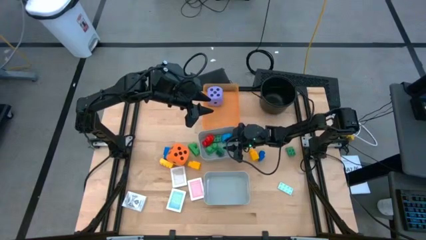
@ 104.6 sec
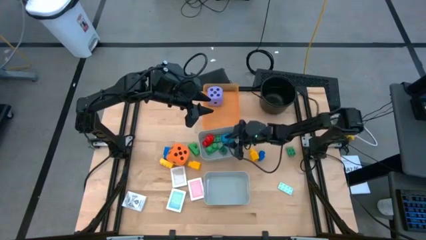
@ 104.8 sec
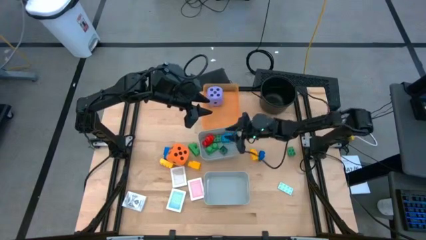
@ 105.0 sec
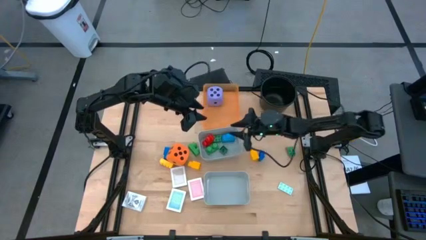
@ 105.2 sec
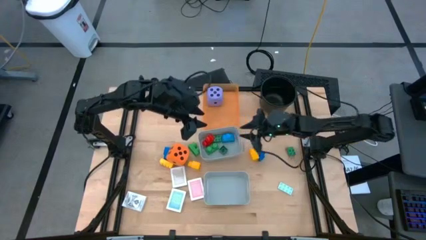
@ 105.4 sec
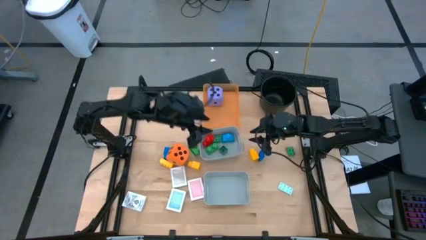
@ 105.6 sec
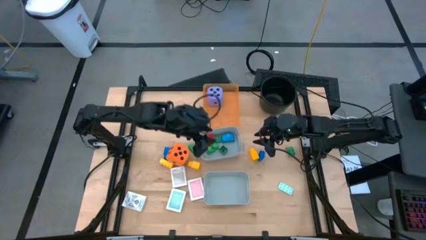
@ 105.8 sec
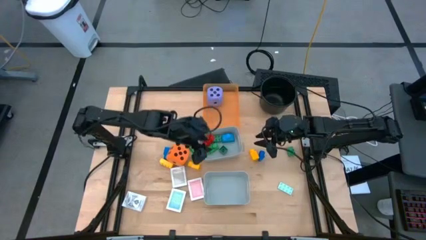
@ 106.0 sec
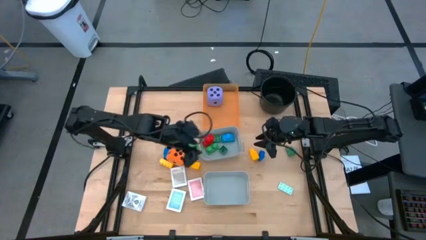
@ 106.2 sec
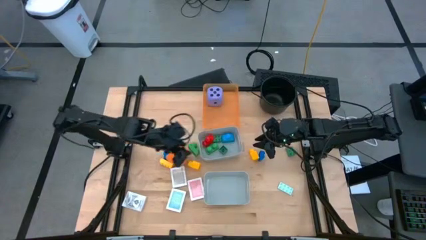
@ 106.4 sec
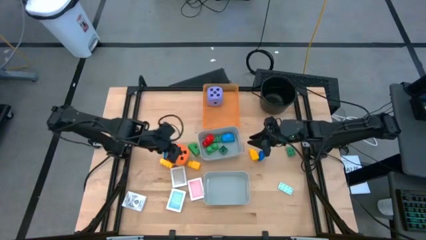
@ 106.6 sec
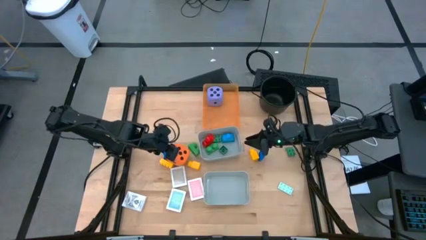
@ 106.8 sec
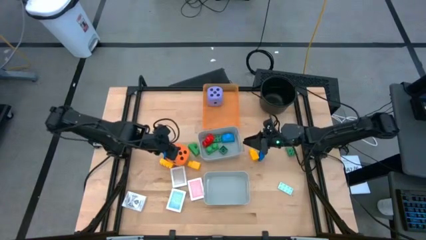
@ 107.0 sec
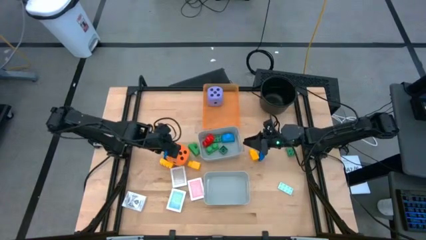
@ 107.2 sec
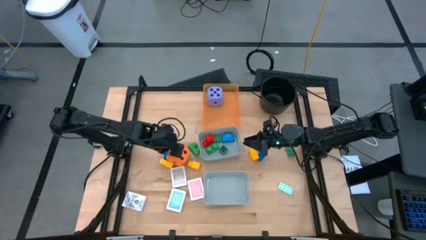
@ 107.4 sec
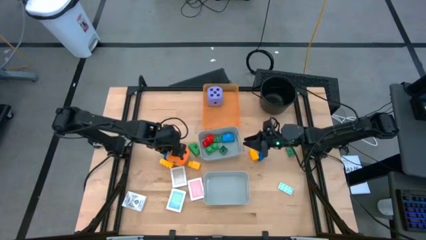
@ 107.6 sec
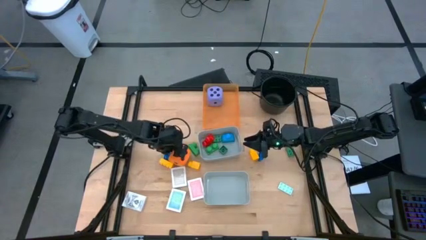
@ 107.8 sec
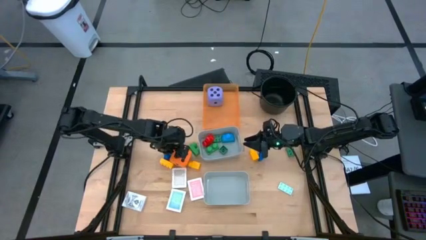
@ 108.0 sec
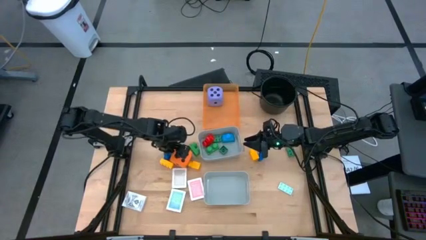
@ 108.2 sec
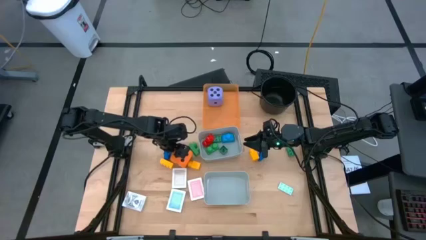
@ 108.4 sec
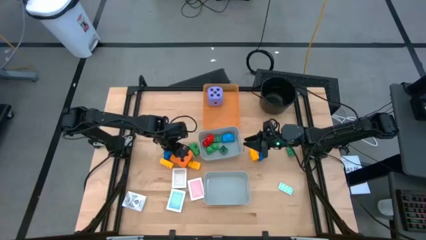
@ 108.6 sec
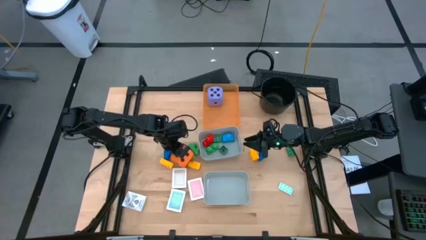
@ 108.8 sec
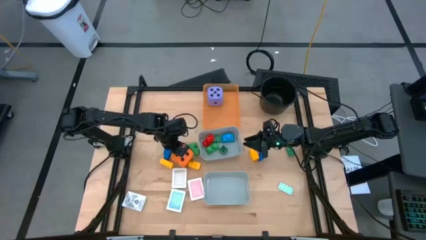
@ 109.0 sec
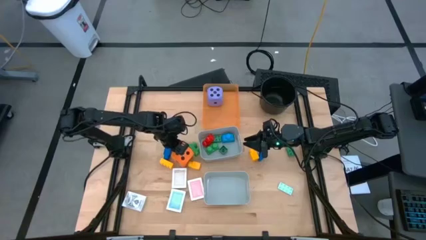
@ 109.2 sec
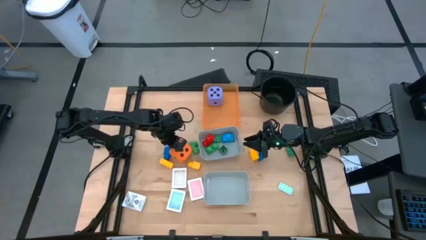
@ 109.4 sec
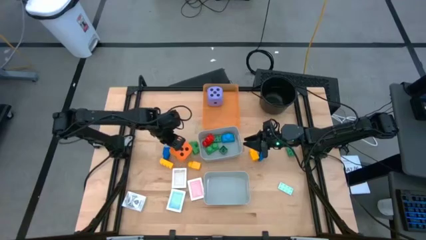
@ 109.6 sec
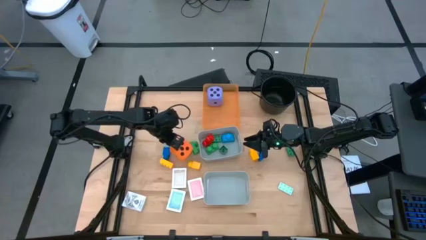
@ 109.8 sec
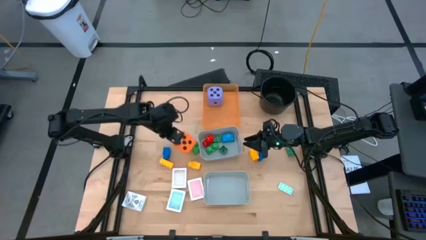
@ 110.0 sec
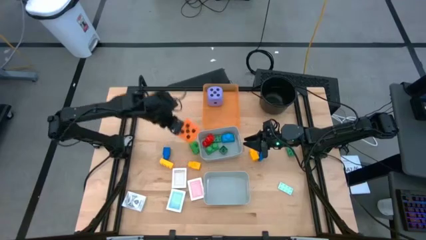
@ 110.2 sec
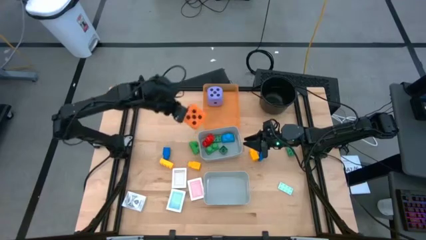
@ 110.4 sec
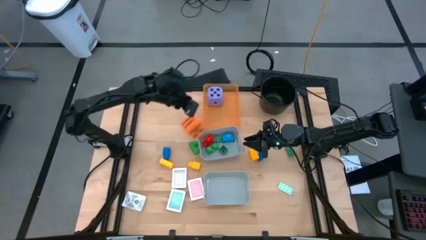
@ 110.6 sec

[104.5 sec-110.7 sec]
Task: Pick & Place Toys
Put the orange dice into the orange bin

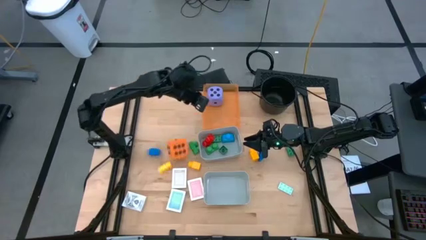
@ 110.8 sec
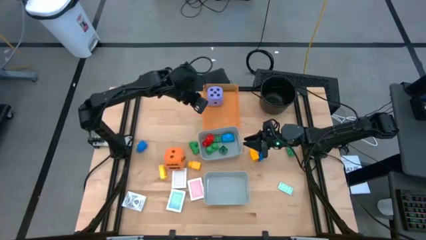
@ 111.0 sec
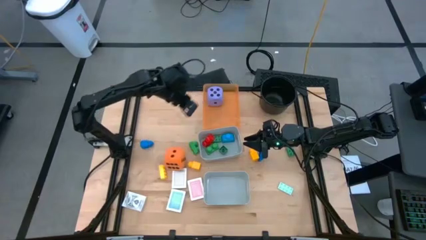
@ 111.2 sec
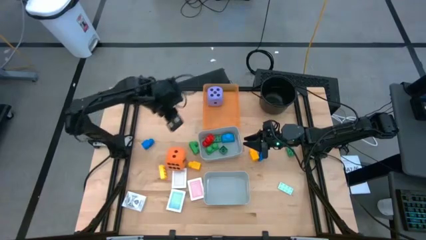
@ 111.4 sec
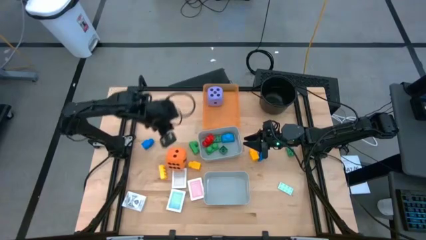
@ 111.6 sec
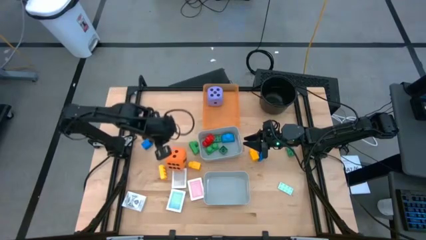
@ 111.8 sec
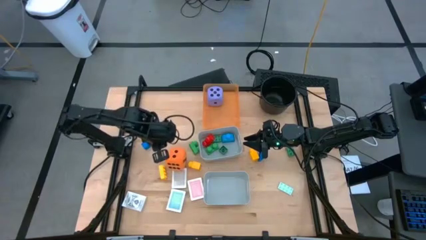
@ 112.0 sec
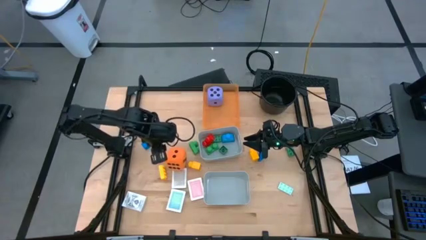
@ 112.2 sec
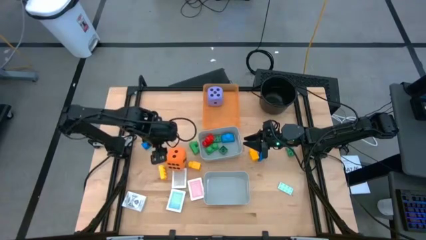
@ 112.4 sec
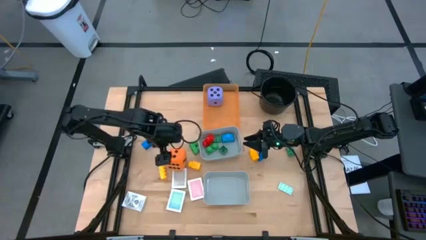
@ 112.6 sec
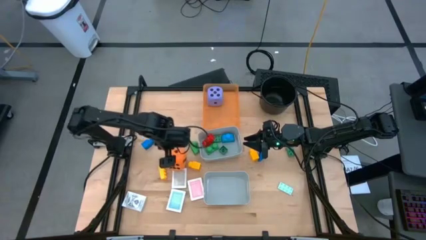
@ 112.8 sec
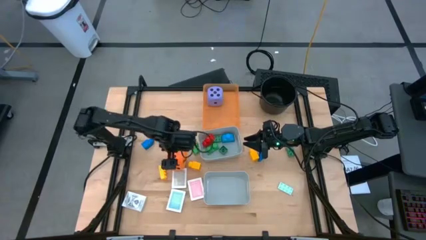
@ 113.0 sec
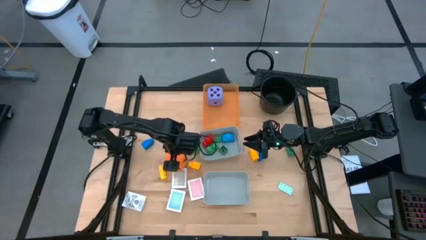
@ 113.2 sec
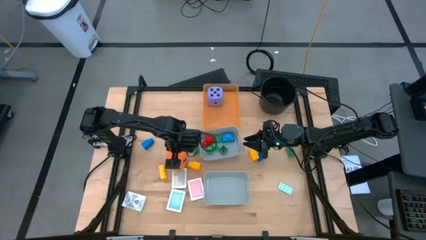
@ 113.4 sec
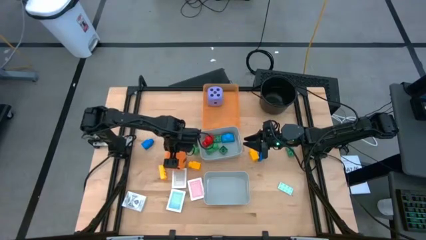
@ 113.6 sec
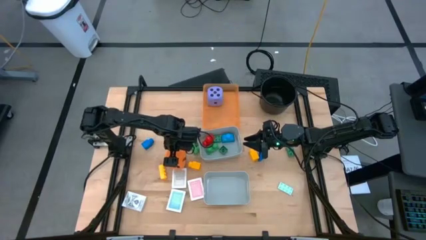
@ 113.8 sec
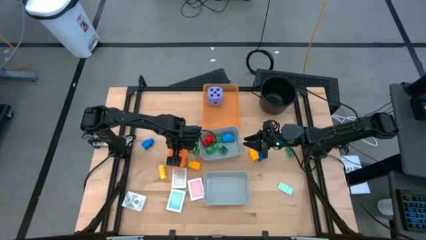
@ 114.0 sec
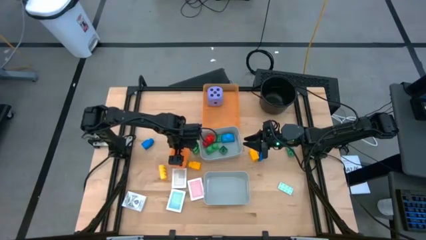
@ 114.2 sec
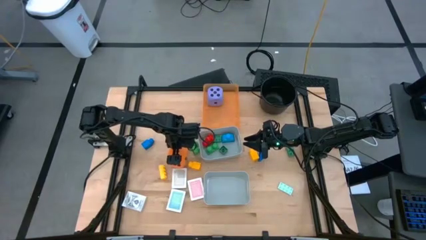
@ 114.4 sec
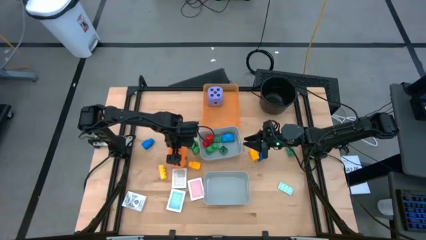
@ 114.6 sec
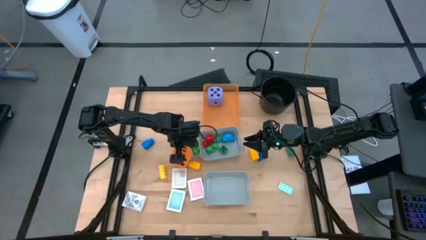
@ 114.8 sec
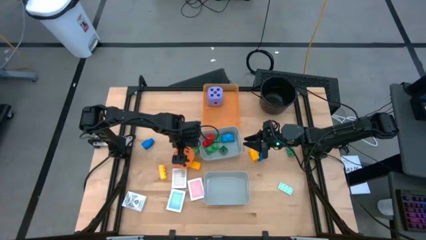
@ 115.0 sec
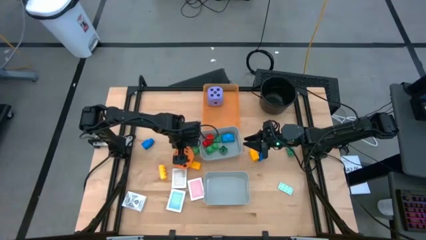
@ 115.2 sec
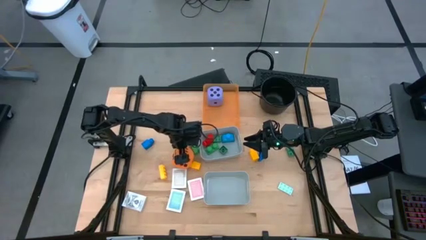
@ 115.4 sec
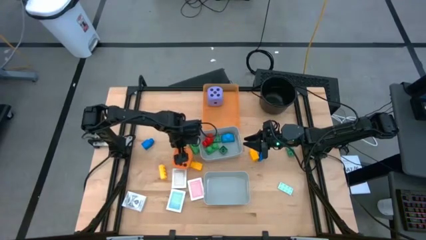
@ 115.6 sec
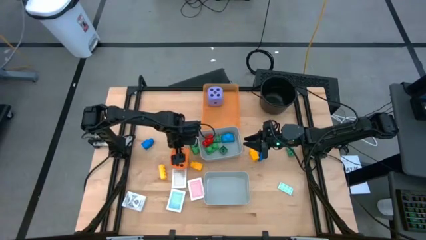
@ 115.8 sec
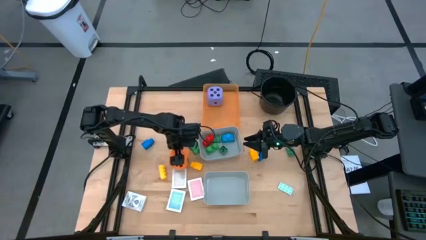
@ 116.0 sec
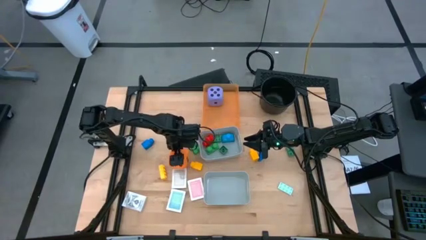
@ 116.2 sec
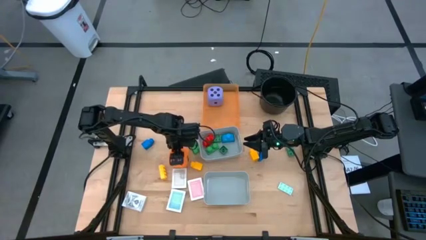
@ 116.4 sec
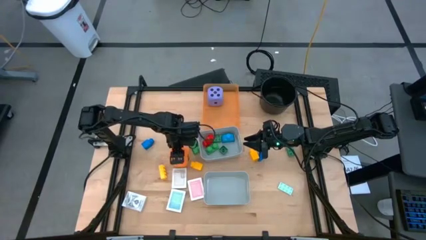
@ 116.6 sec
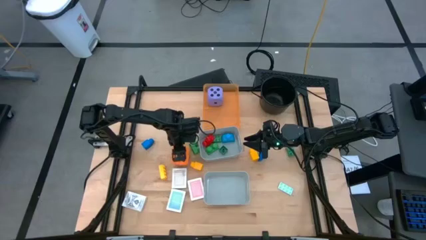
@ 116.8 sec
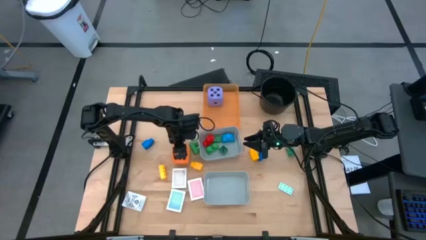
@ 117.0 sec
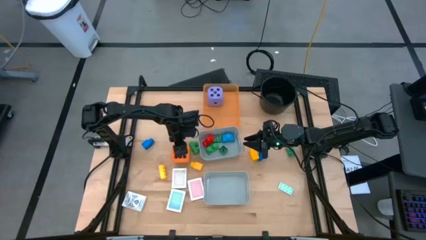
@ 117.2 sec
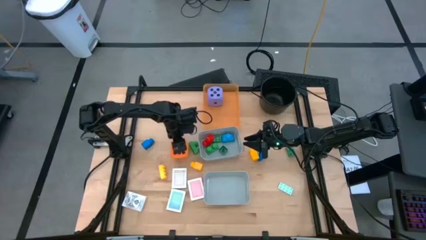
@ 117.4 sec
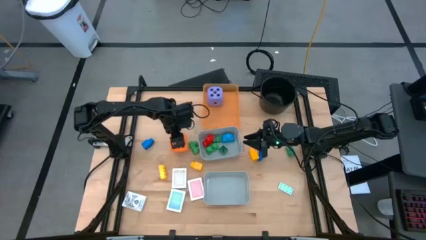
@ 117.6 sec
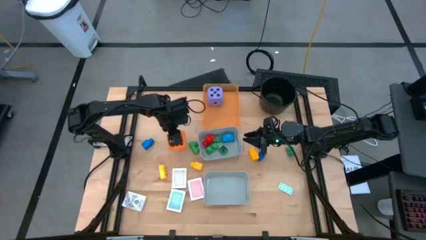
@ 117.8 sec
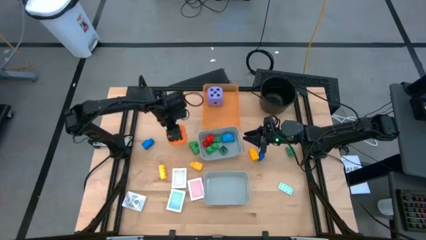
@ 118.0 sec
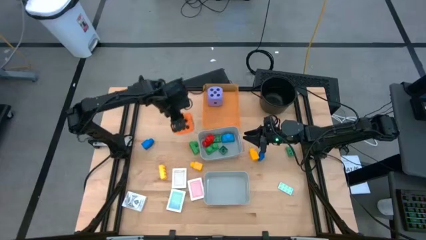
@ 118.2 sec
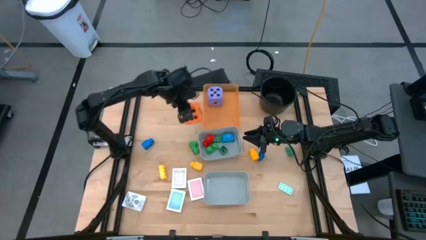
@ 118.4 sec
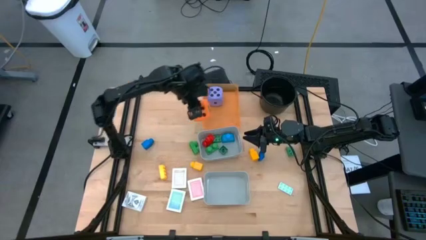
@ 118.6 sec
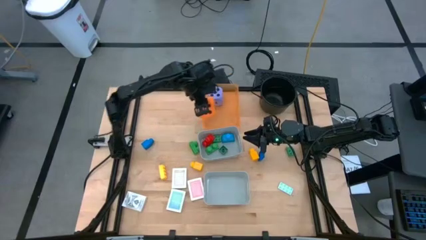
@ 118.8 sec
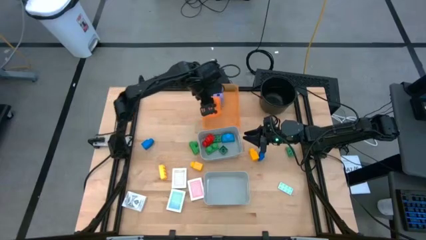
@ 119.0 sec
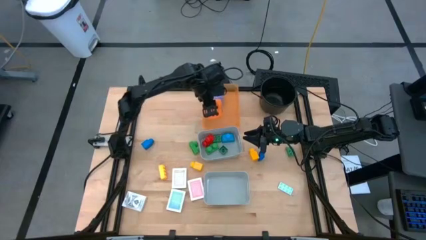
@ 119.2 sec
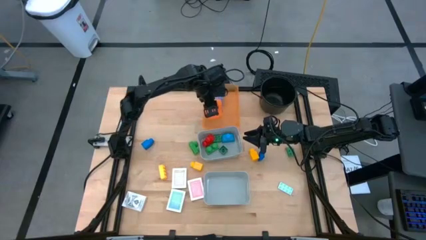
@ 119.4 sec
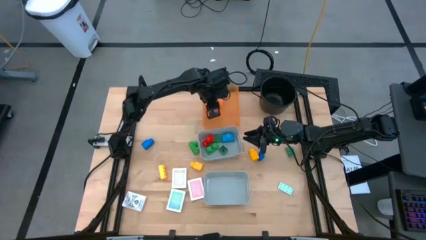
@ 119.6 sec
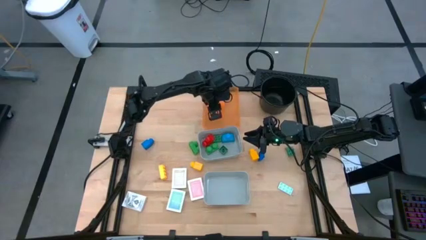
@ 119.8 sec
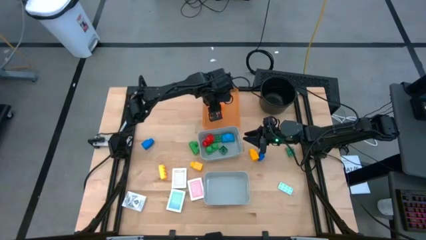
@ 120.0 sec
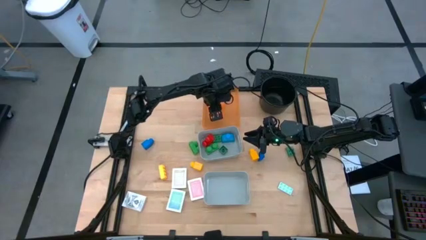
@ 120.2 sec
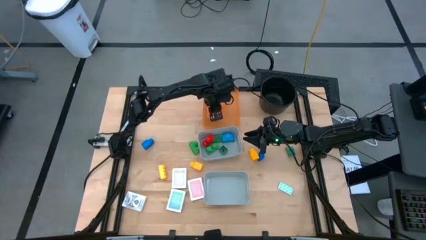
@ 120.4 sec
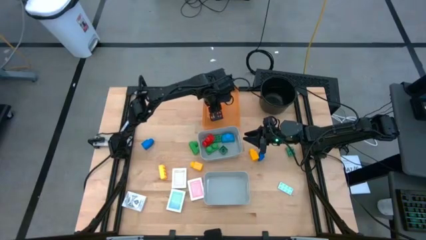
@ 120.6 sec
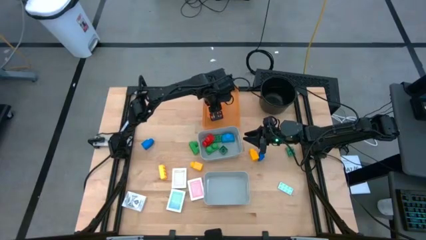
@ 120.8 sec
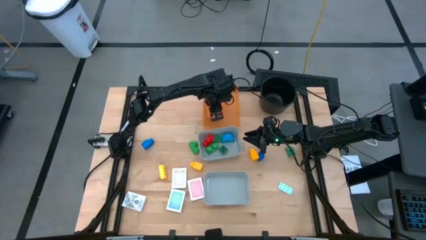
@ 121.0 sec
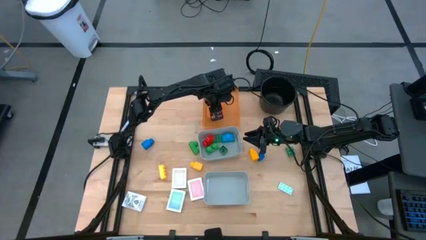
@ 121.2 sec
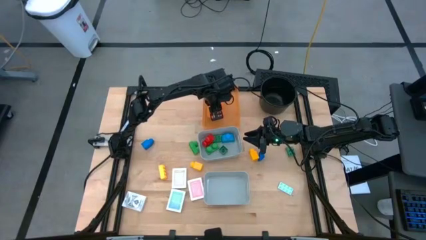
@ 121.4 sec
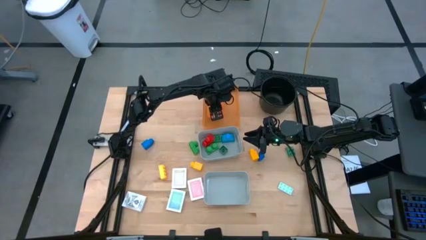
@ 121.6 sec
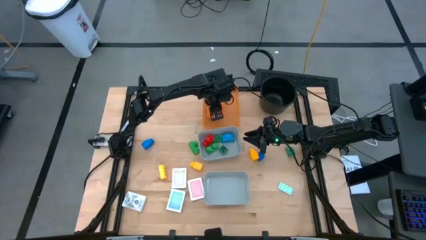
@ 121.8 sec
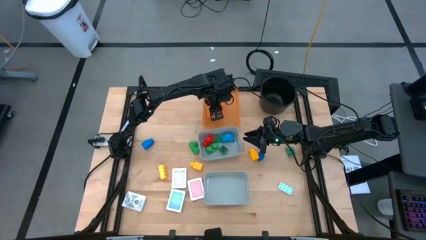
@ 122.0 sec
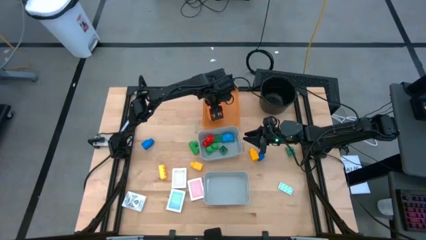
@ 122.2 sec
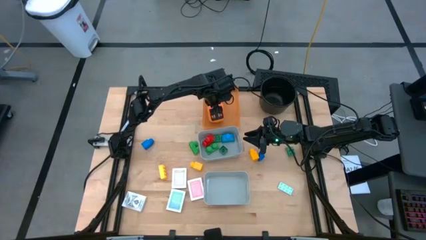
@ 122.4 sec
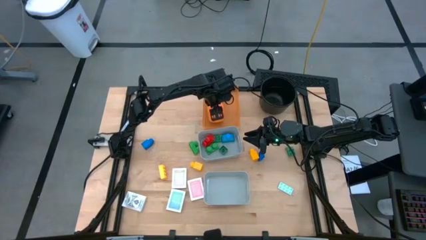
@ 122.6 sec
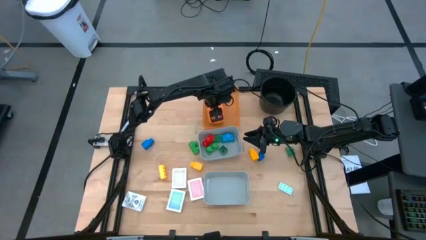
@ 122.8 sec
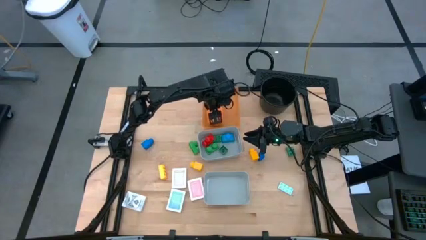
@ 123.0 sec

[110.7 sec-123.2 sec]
Put the orange dice into the orange bin
